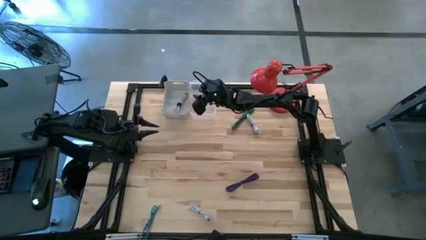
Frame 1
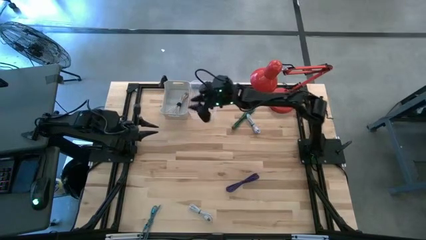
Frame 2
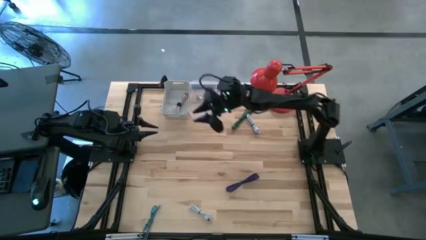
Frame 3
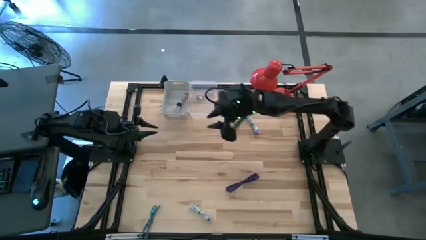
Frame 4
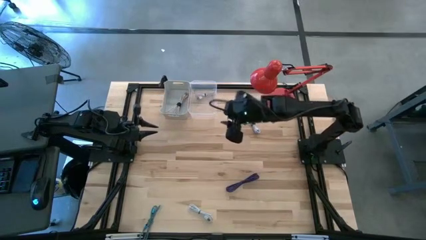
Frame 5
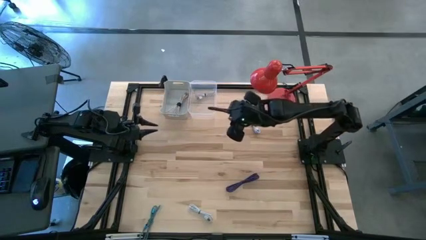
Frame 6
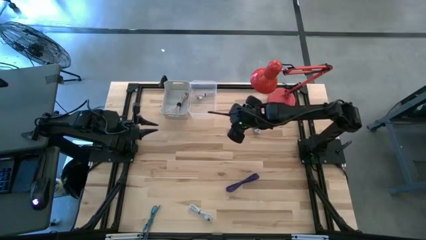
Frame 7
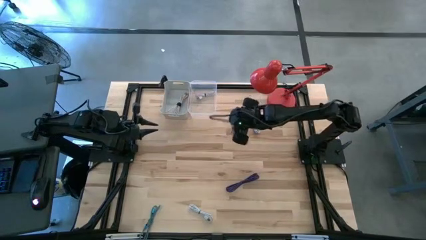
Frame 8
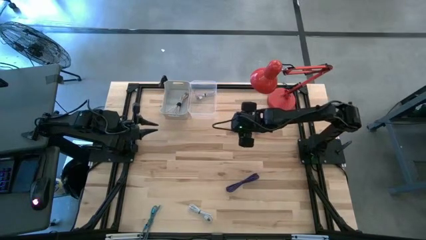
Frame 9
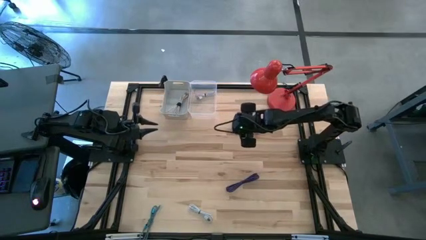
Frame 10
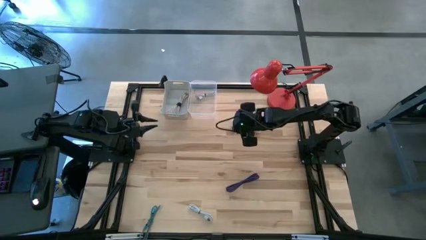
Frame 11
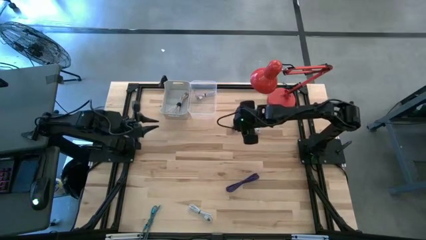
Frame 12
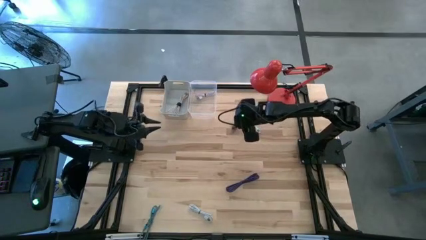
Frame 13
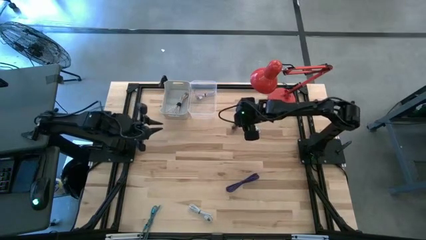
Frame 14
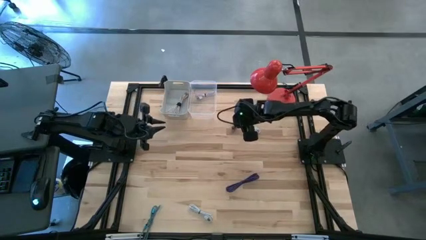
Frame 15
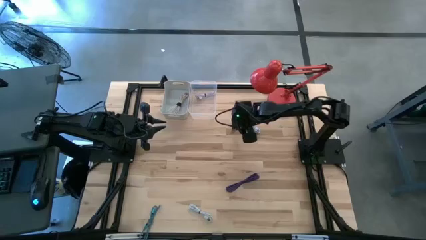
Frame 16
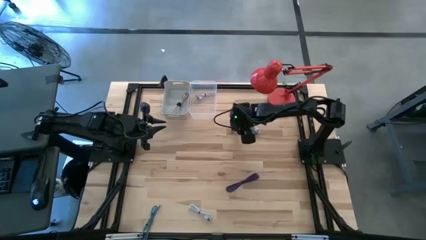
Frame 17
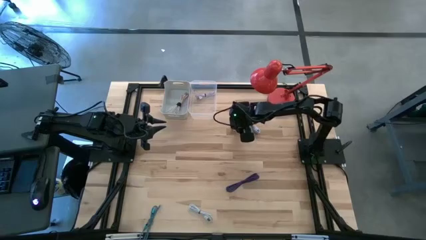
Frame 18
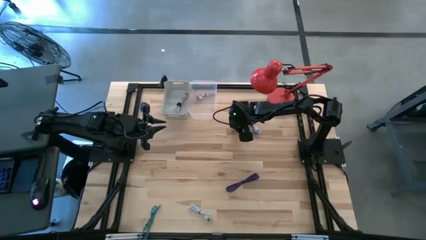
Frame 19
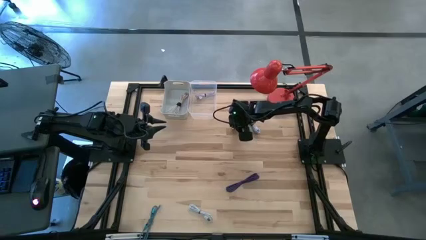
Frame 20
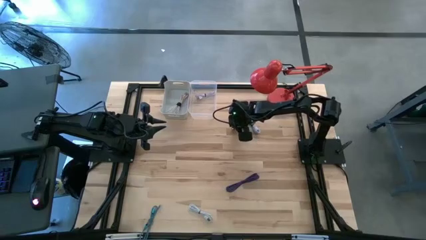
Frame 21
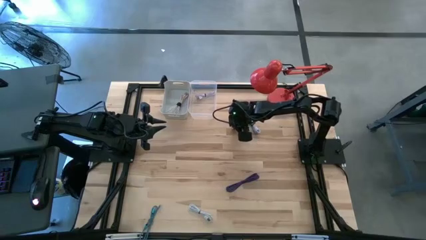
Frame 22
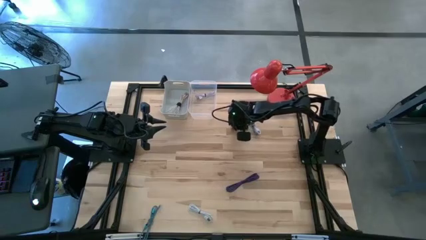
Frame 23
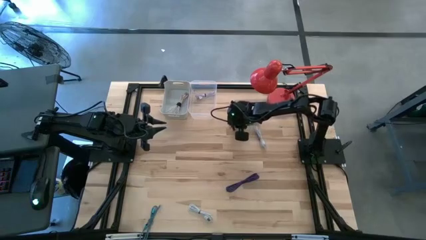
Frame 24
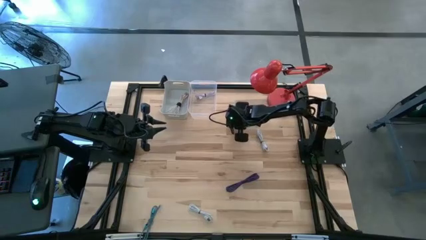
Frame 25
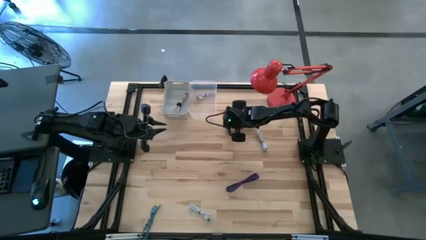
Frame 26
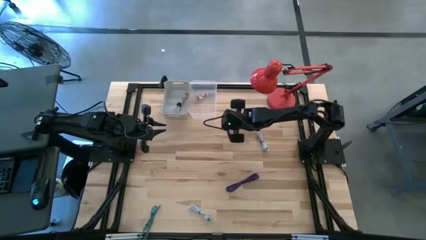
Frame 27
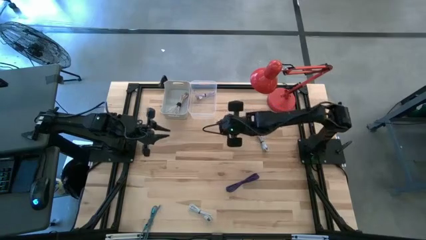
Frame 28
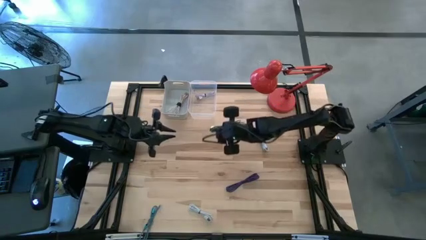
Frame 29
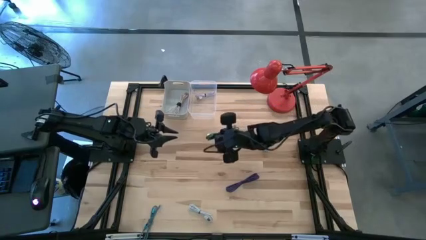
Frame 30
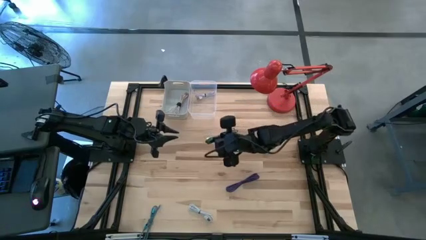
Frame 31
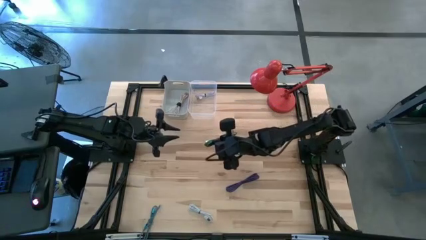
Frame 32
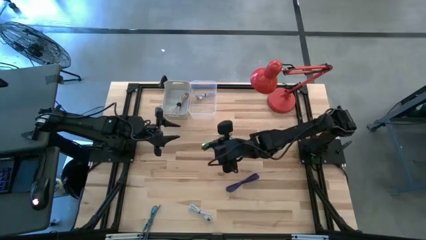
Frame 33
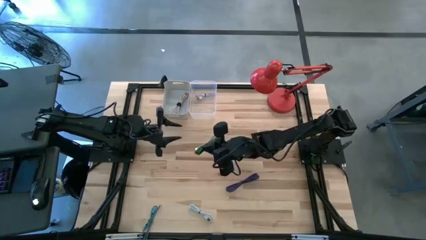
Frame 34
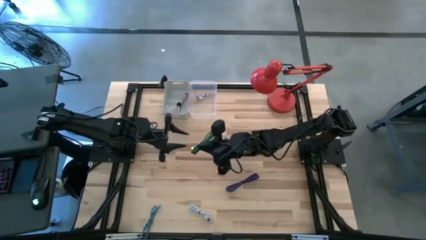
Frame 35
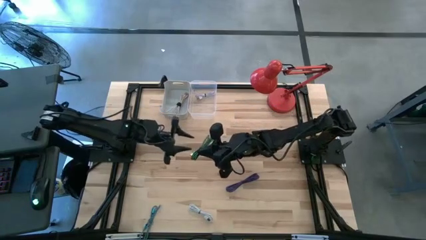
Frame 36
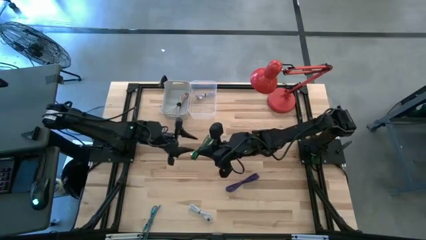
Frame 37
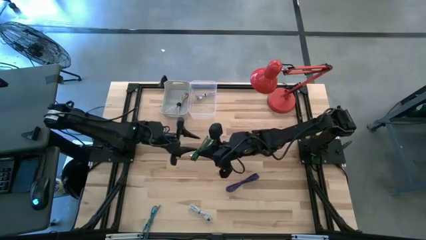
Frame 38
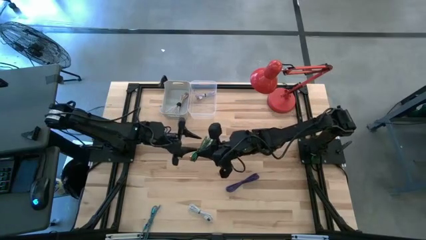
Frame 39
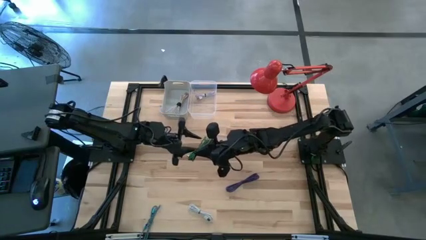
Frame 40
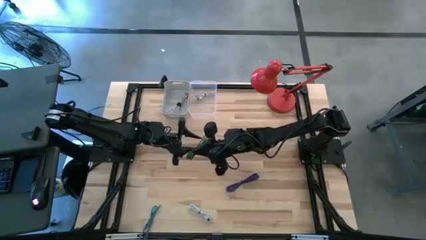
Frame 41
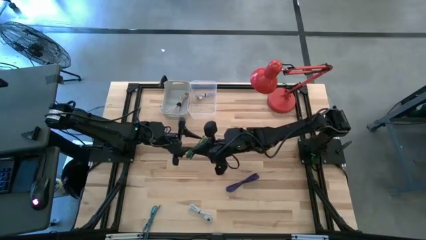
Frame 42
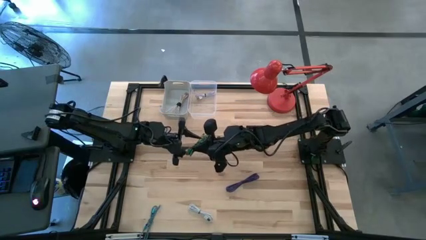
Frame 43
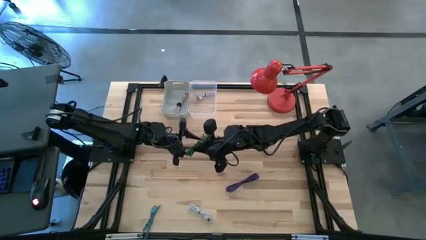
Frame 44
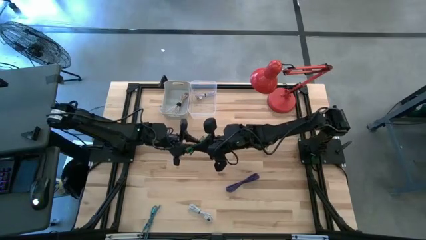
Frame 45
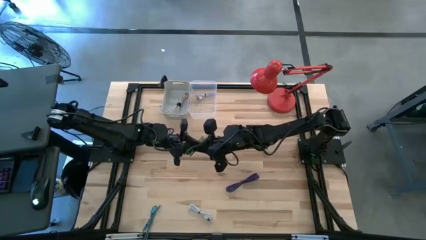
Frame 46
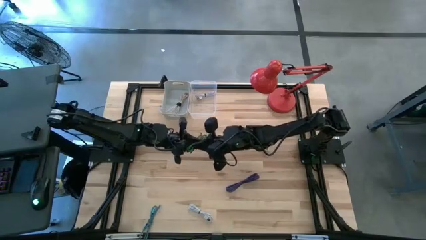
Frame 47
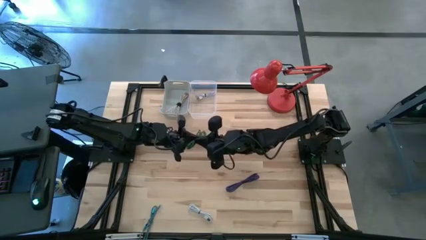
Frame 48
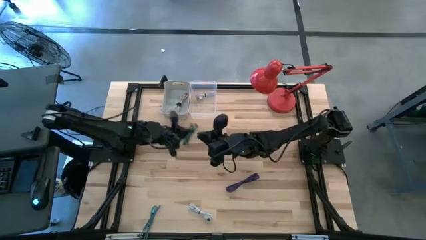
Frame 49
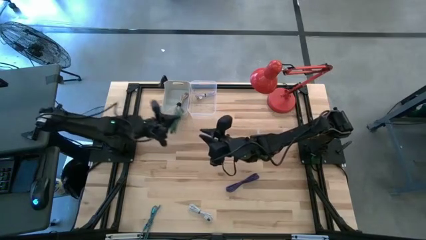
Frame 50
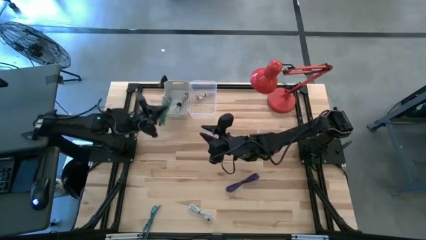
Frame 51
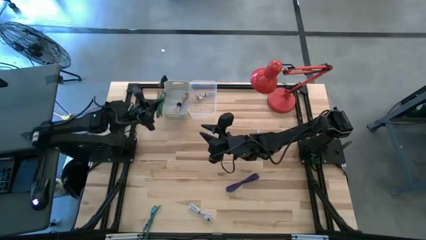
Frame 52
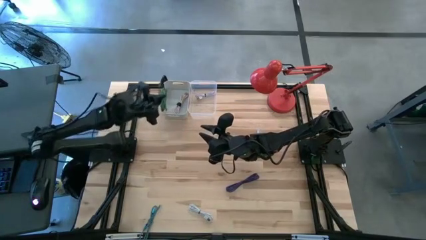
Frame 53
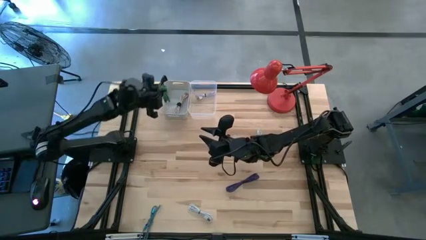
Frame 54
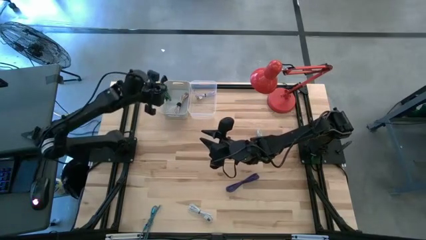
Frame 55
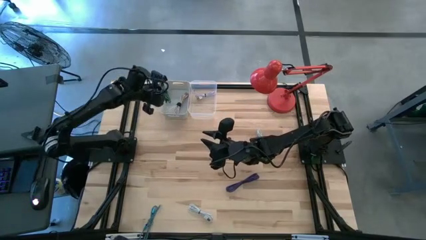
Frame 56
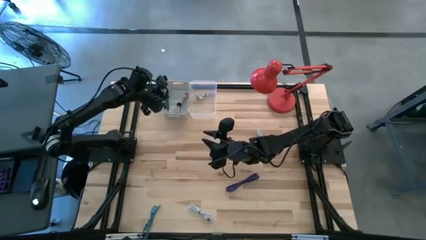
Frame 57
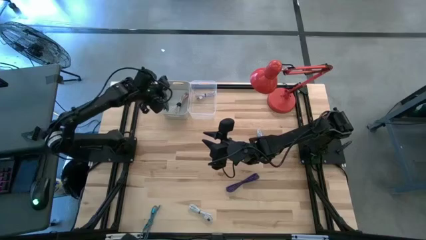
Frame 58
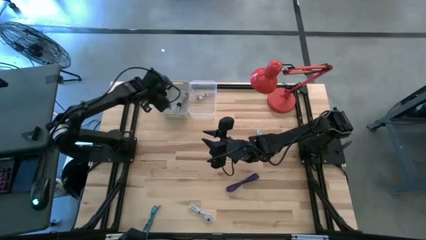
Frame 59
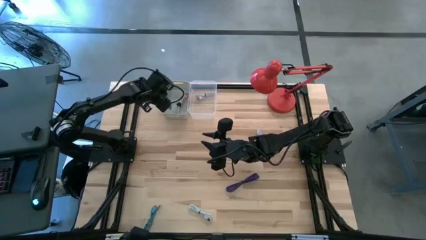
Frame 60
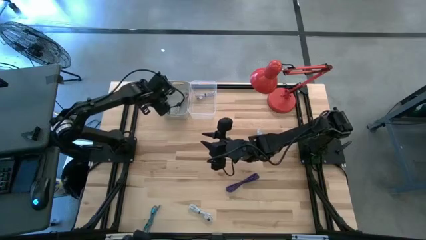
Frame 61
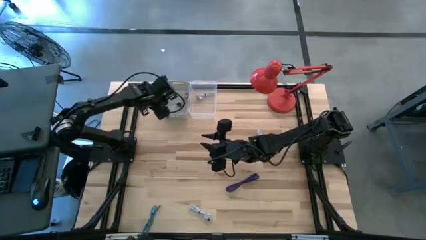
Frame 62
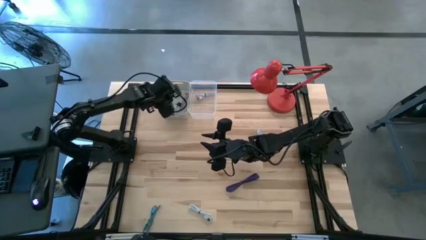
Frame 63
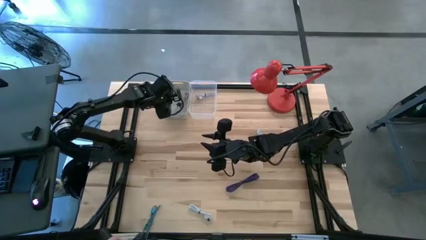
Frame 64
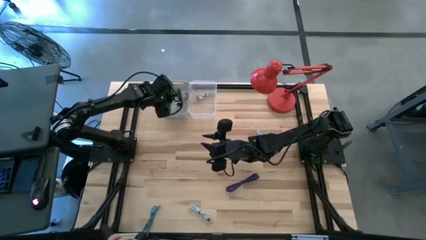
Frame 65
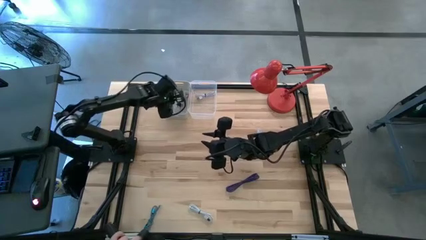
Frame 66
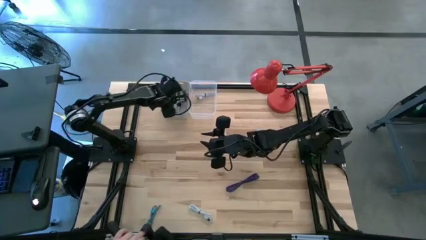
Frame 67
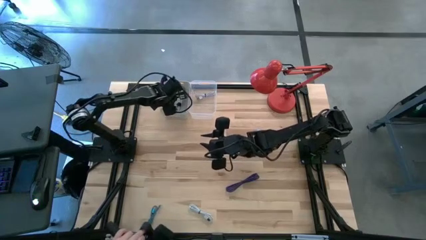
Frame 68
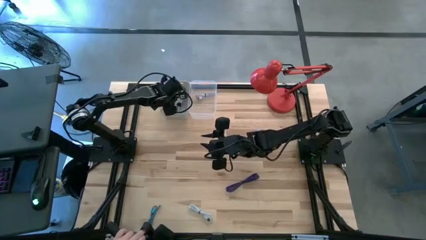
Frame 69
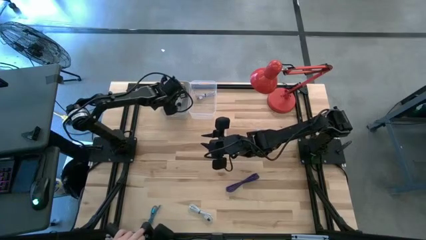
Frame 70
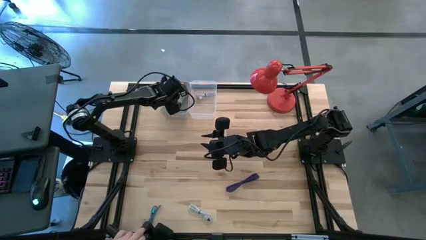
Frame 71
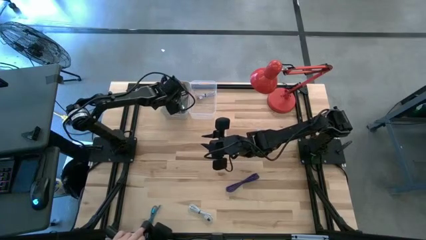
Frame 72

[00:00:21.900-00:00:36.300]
Task: Pick & Place USB Port
Put the green patterned charger cable into the gray bin

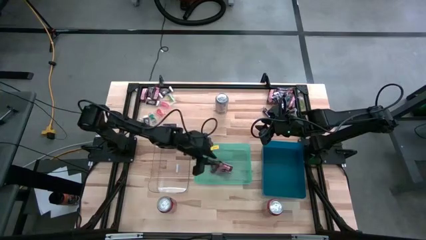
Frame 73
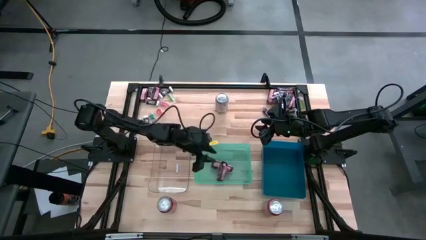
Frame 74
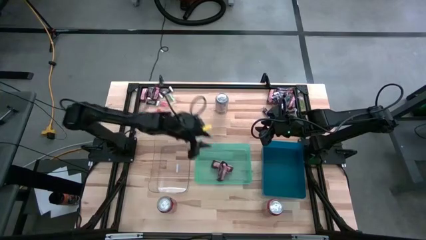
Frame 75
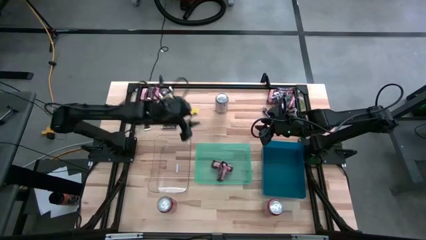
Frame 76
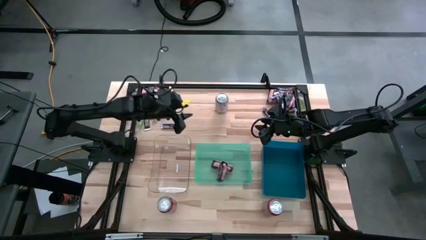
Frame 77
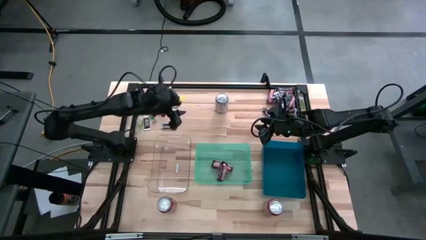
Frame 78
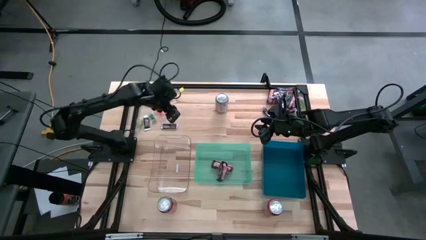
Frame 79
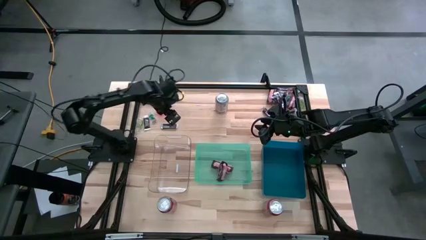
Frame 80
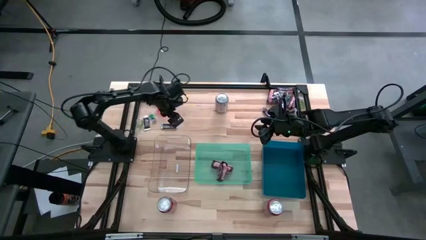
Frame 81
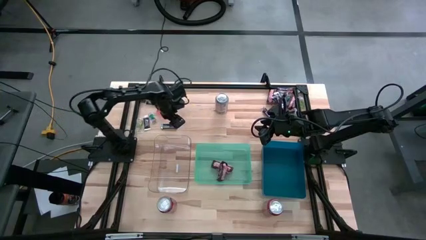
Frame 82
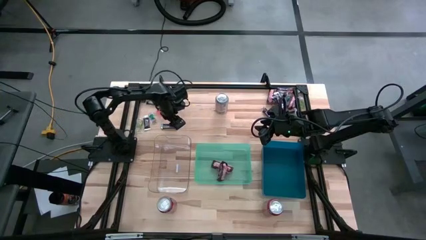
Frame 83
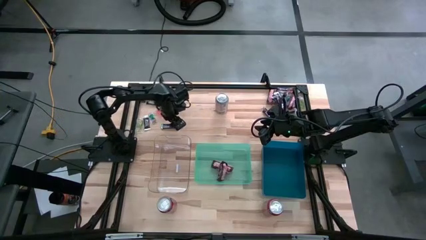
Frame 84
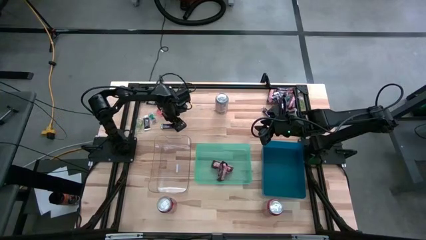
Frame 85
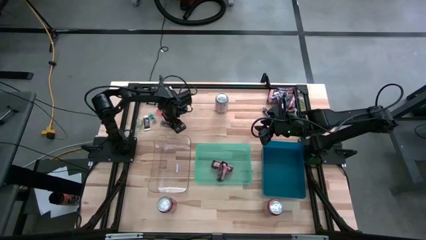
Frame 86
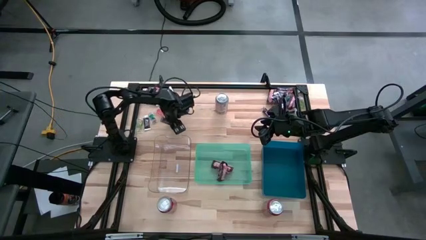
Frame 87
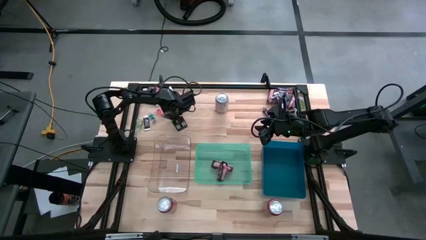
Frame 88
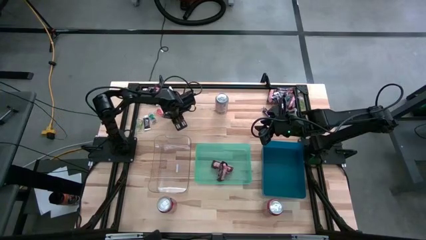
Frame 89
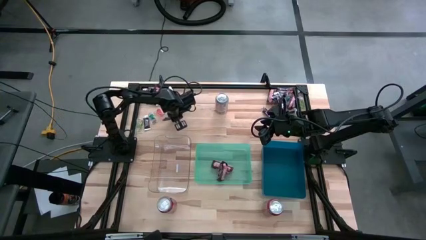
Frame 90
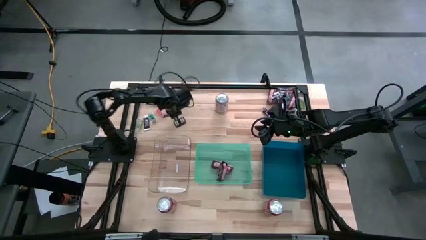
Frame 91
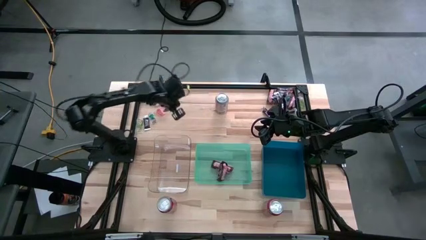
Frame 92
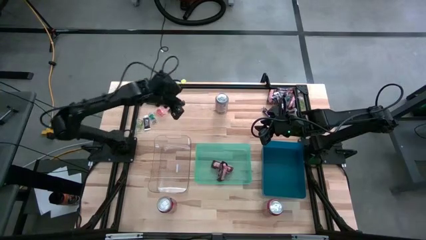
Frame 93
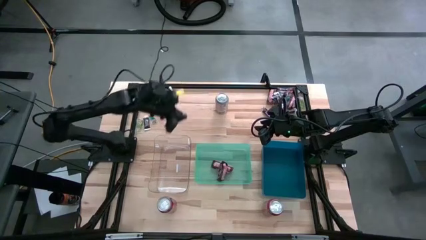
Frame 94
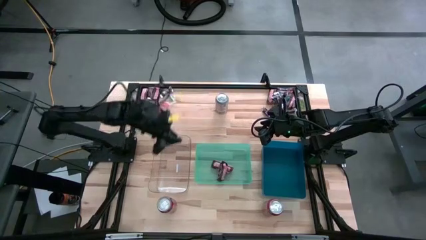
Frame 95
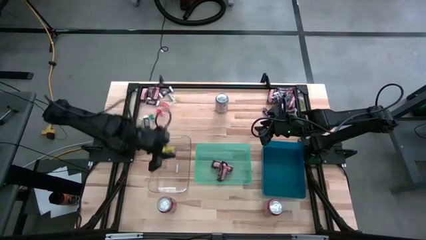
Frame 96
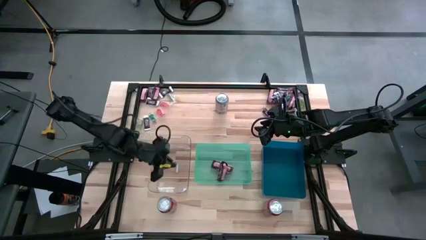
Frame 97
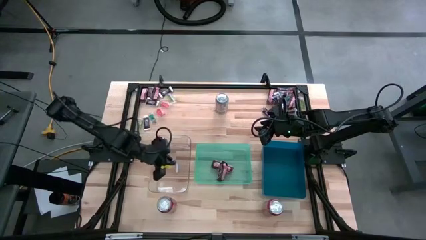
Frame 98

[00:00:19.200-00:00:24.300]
Task: Organize candy in baskets
Put the brown white chocolate bar into the transparent bin
